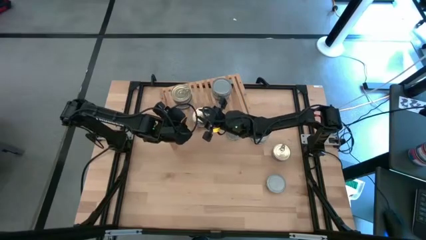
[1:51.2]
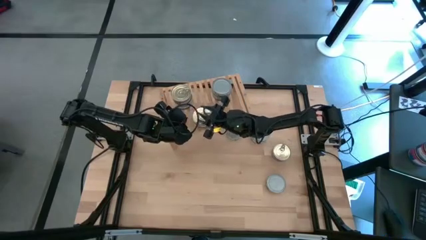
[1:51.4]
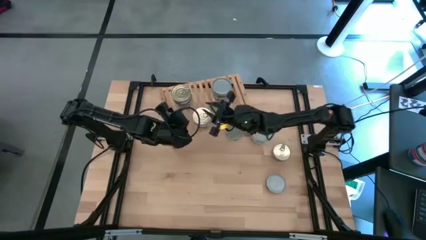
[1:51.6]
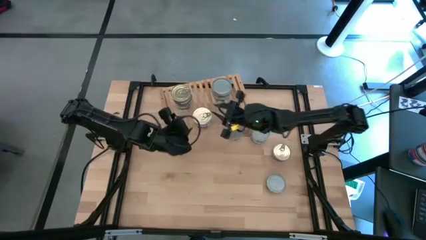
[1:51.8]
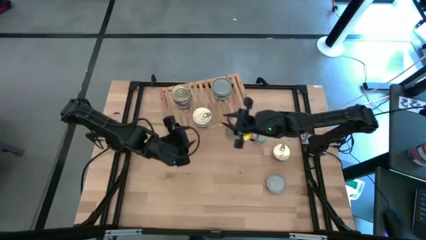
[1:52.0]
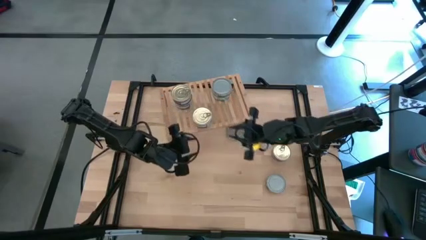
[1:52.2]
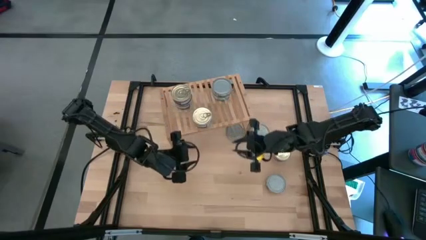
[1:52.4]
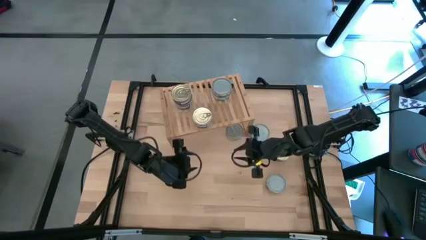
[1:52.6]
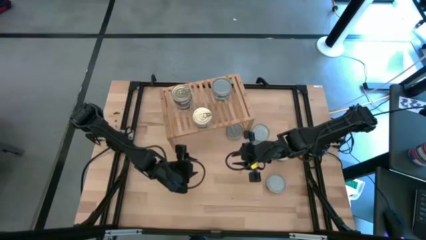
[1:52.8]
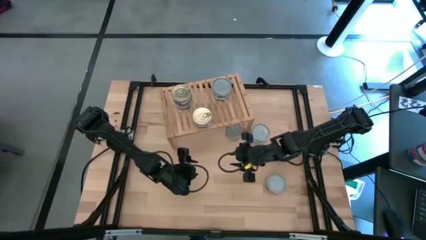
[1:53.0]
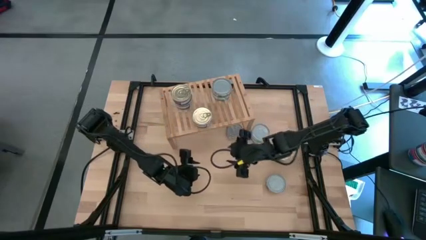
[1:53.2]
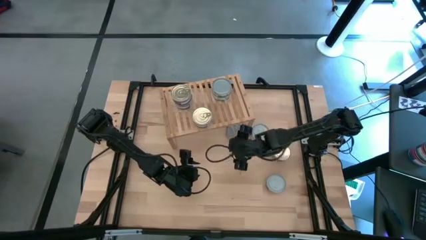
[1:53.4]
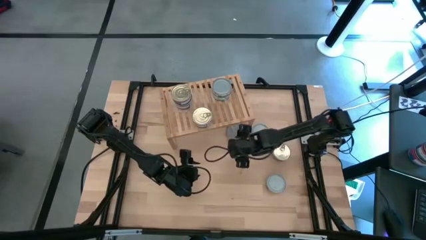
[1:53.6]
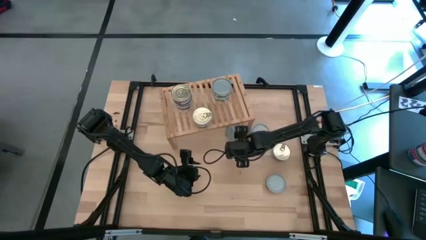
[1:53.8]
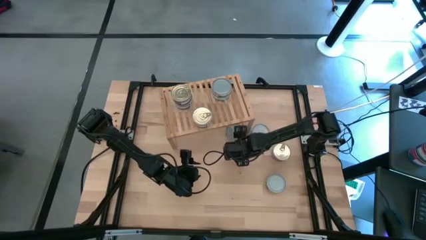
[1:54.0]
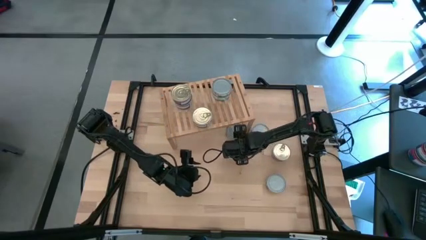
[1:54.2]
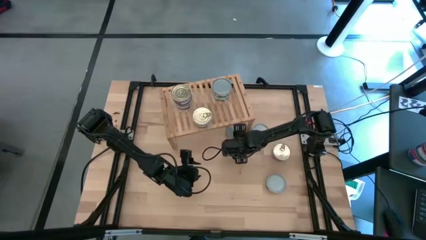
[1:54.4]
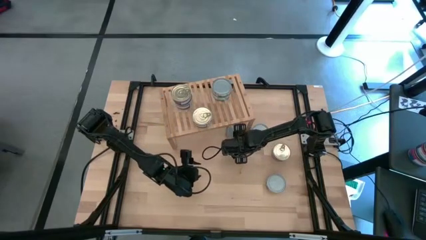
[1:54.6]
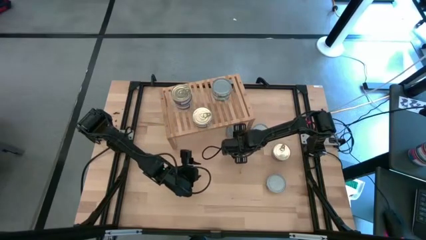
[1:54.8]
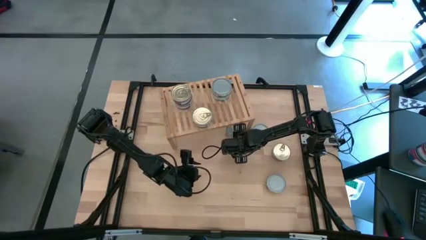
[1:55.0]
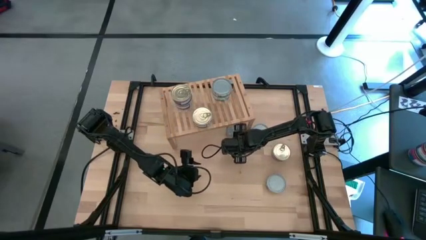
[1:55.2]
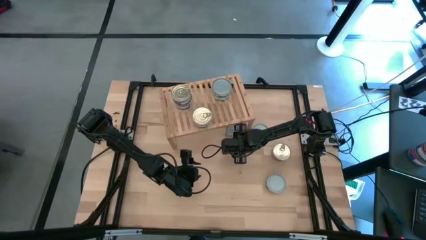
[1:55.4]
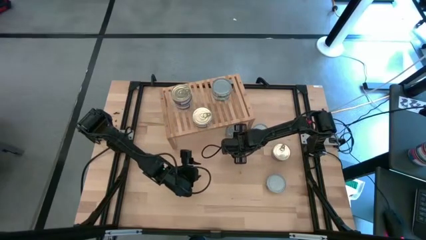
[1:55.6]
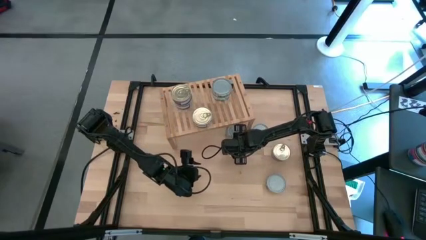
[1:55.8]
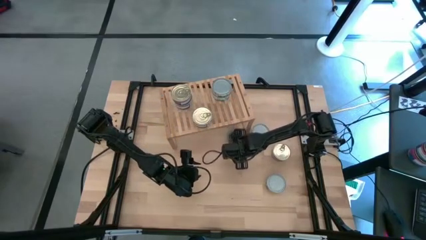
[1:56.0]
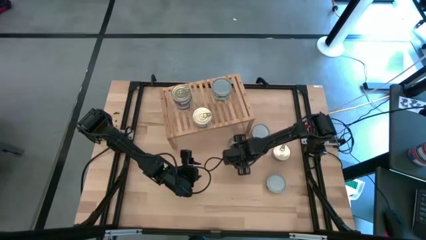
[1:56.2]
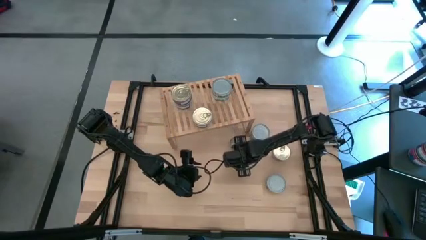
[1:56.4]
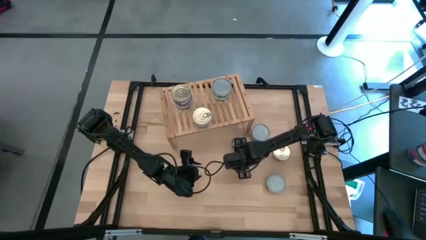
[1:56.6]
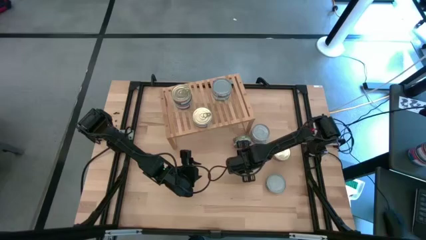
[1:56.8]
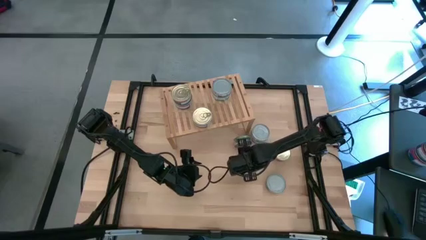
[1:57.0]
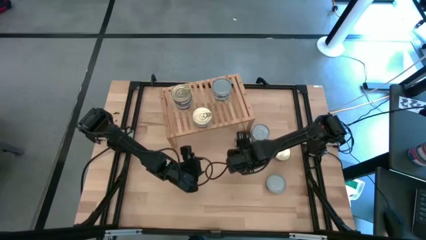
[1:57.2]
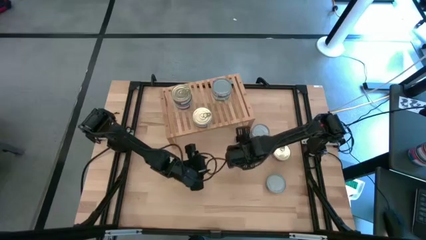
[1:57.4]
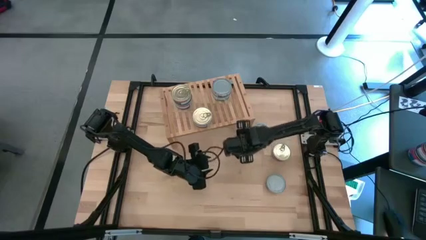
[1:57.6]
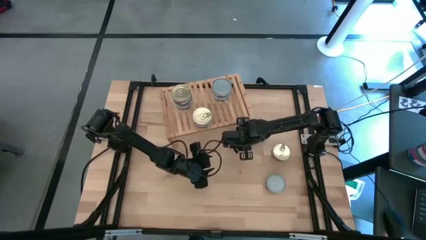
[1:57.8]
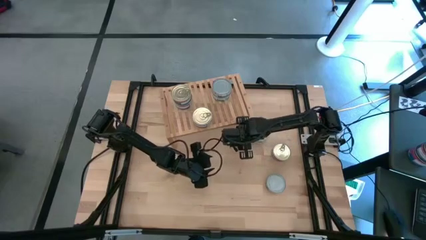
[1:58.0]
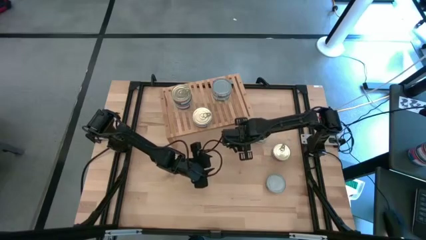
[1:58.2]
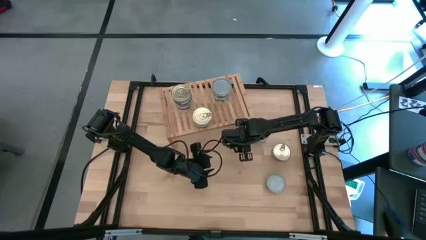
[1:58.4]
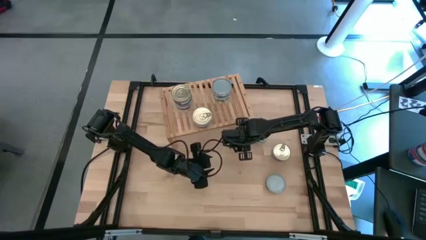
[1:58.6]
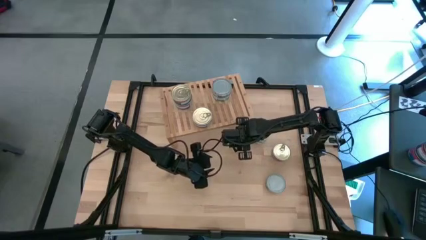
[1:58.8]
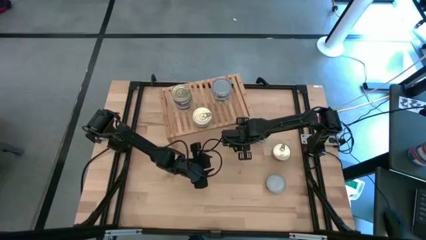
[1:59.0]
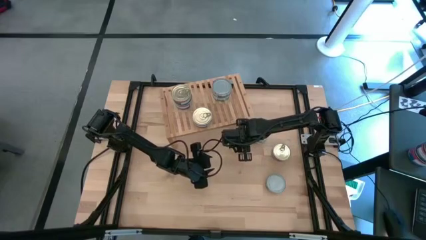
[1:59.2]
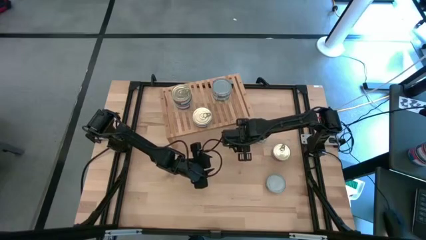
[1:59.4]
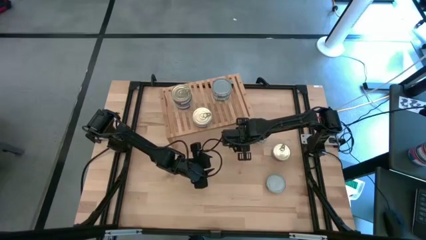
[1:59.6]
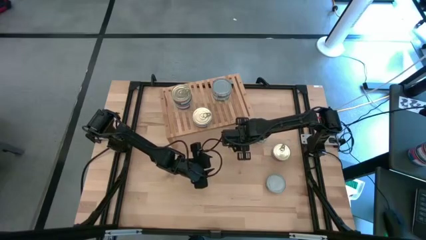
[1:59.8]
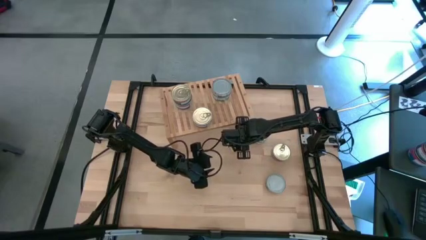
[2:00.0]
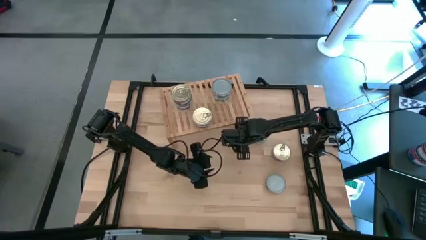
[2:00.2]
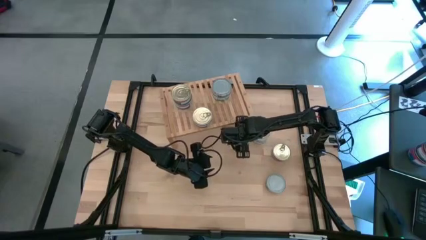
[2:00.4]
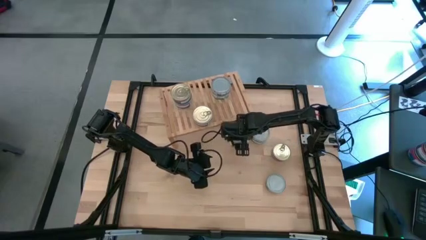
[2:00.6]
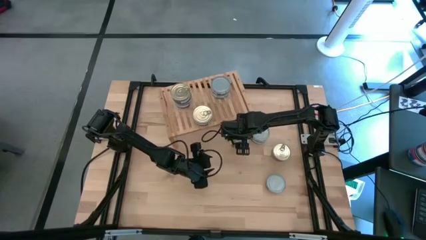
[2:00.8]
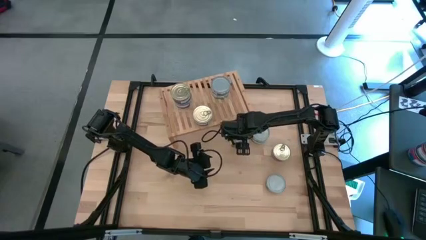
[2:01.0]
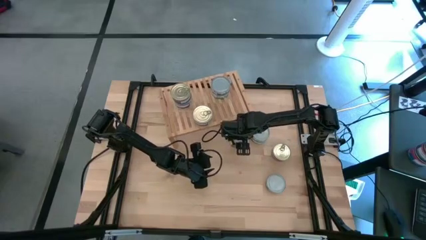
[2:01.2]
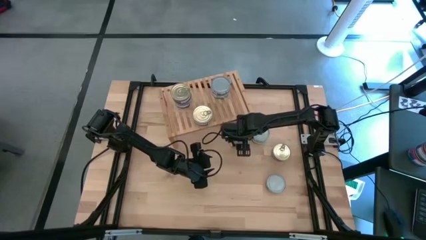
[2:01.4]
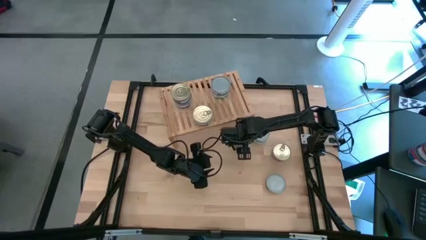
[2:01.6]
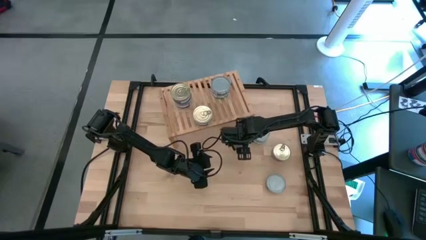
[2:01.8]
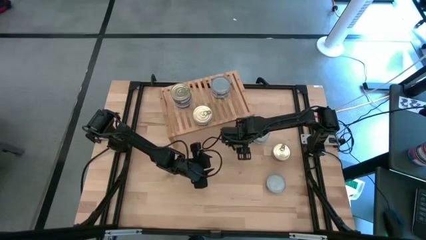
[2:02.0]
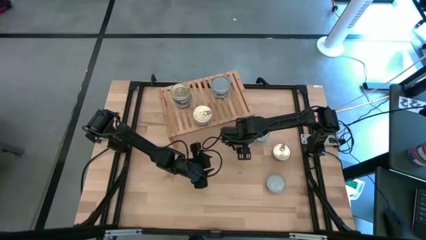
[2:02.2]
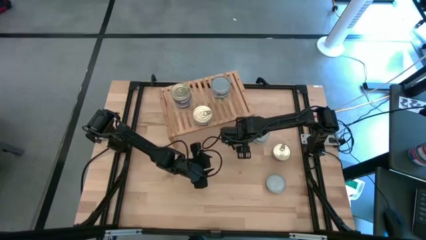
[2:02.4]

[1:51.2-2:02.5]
Task: Stack canned seafood by type on shelf
Stack the green tuna can on top of the green tuna can on the shelf
